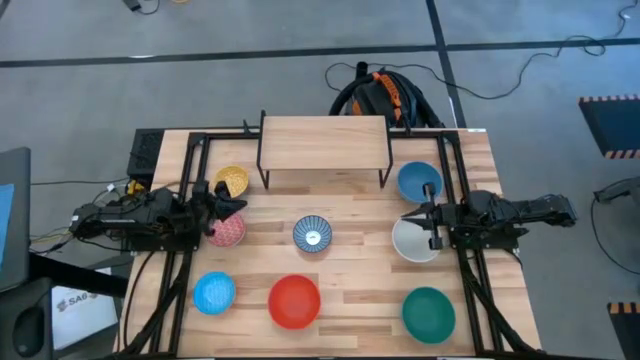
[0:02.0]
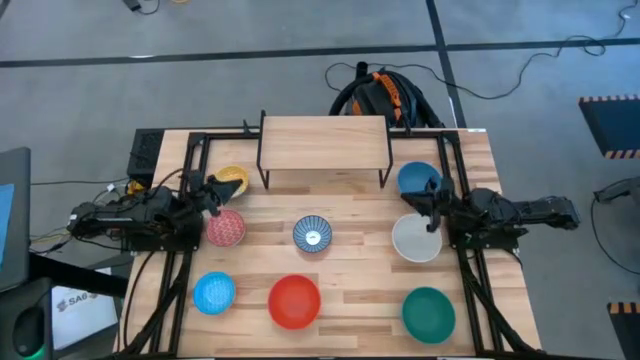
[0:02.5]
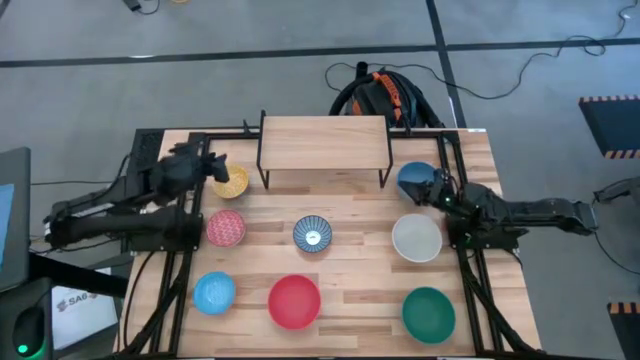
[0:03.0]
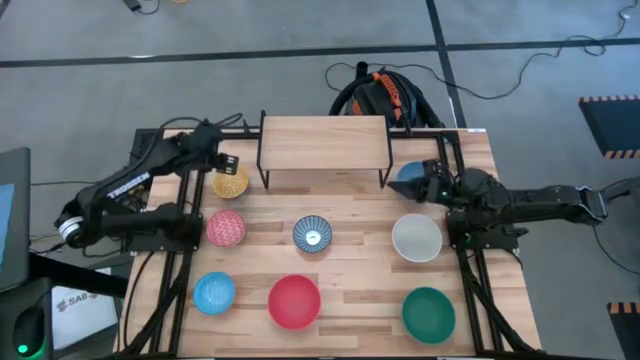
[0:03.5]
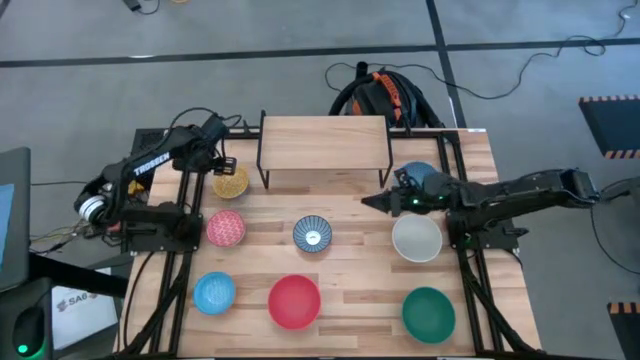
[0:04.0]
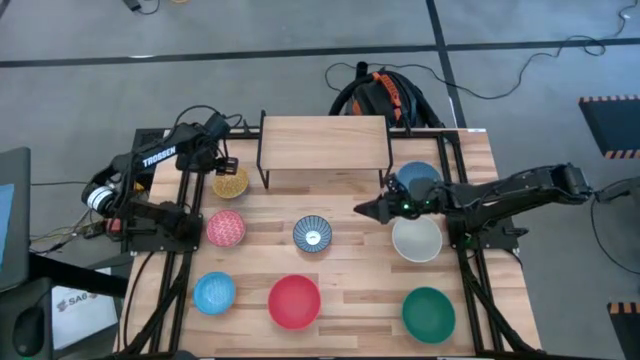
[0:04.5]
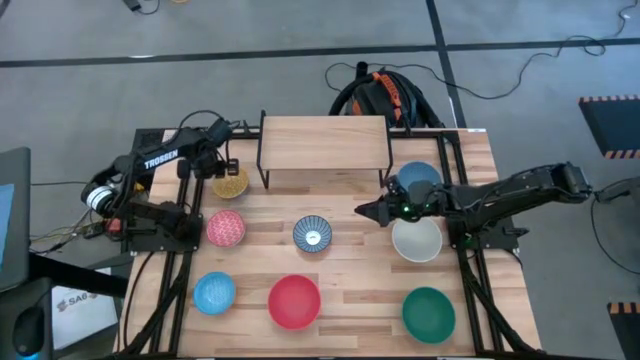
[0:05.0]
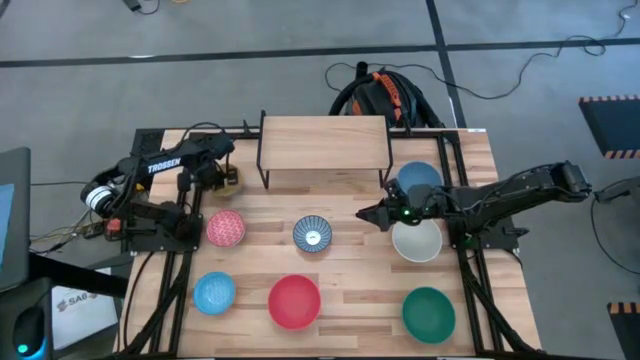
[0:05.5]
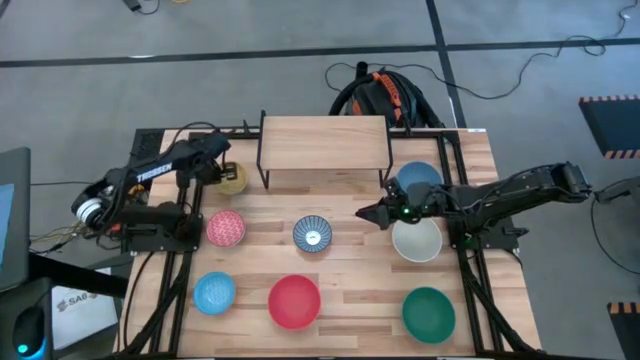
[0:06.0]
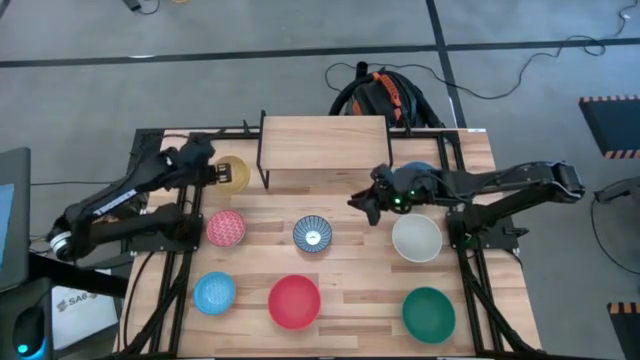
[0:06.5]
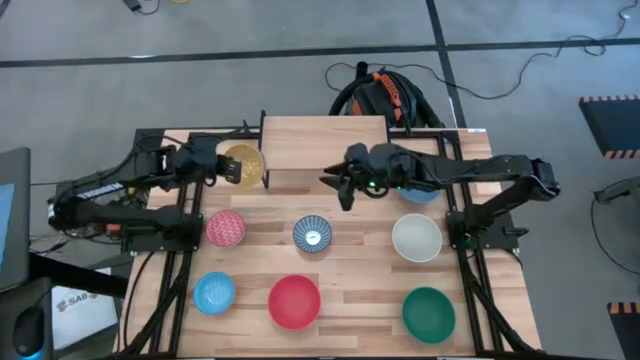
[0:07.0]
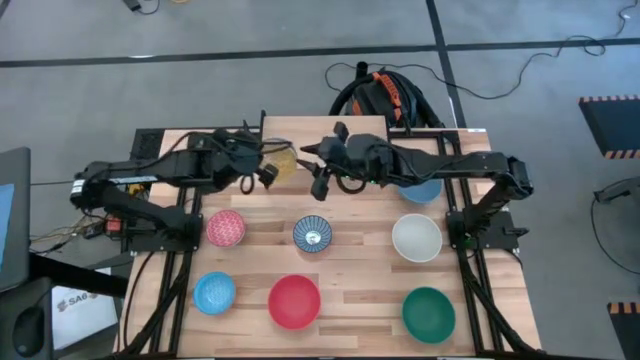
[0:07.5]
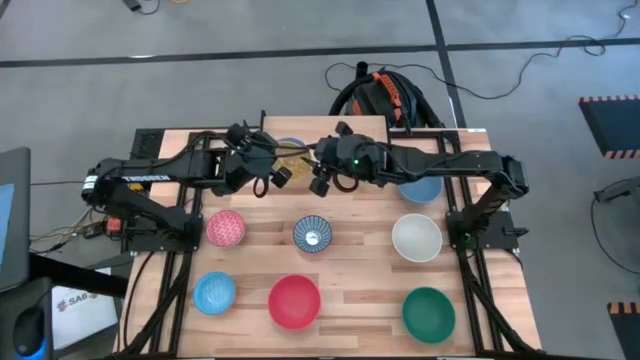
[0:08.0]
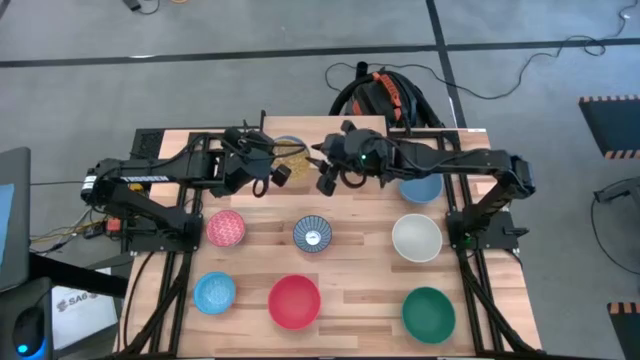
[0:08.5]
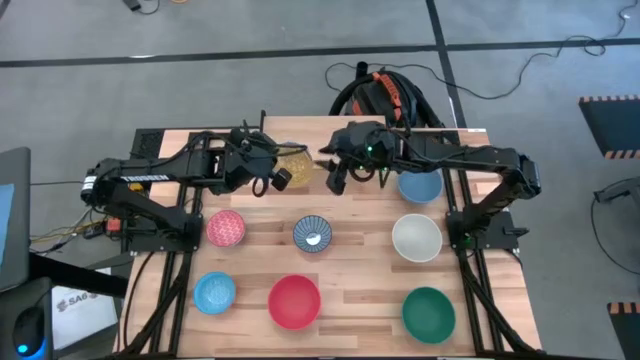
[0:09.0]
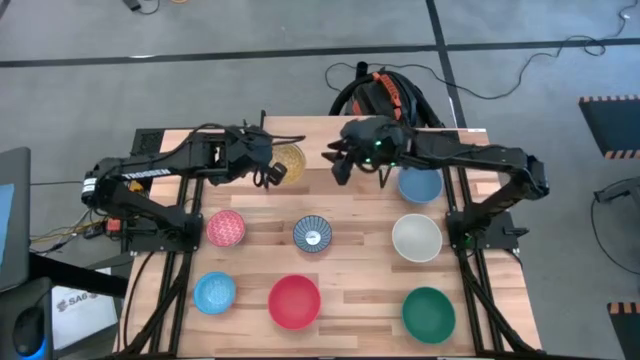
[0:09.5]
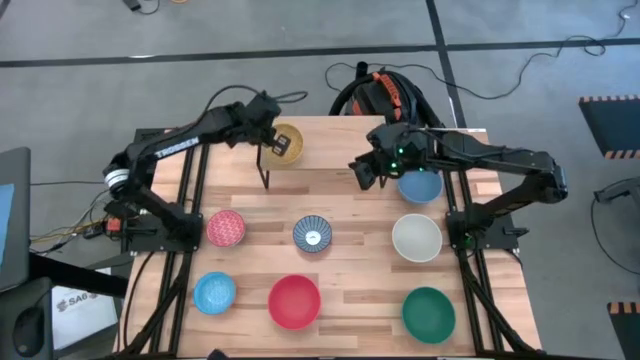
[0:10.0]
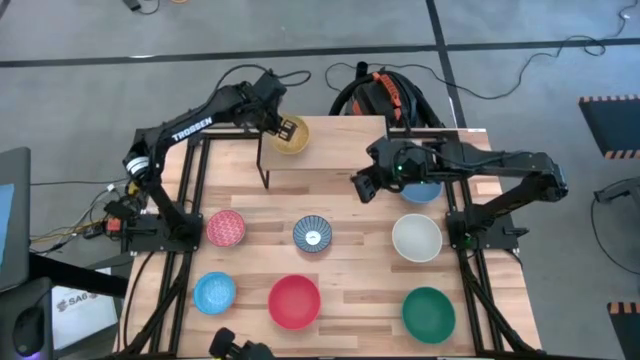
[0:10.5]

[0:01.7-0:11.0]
Task: Place and stack bowls onto a shelf
Put the yellow pattern bowl on the shelf

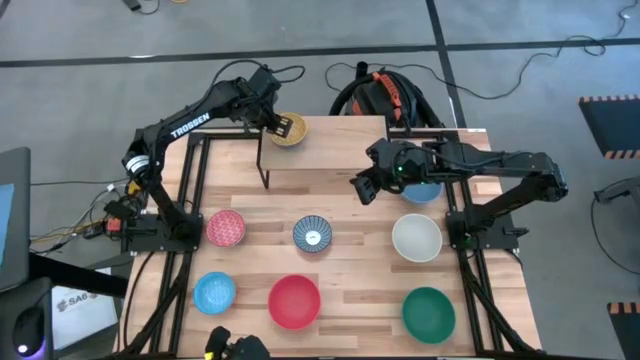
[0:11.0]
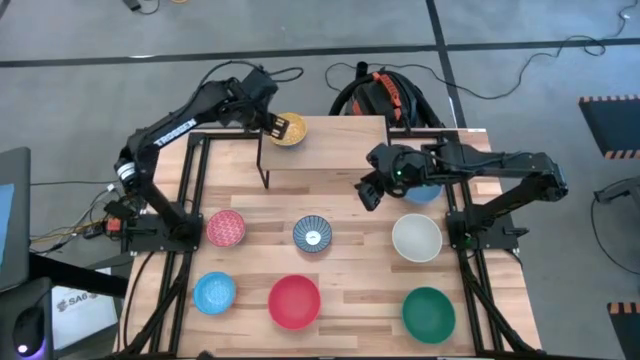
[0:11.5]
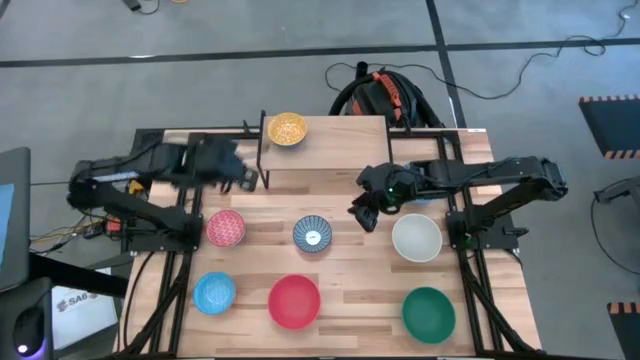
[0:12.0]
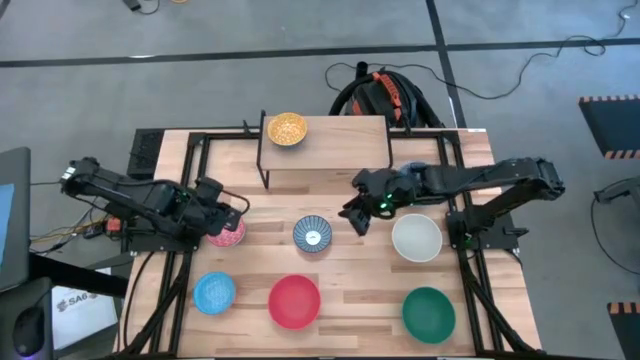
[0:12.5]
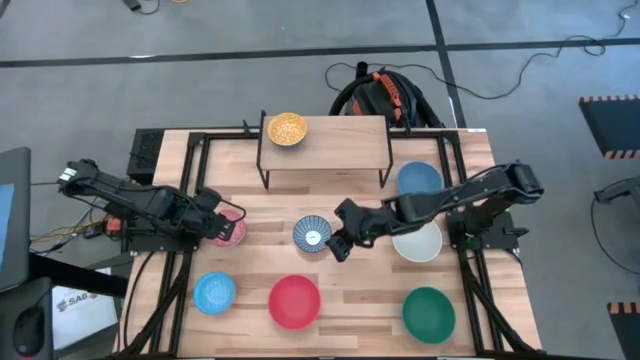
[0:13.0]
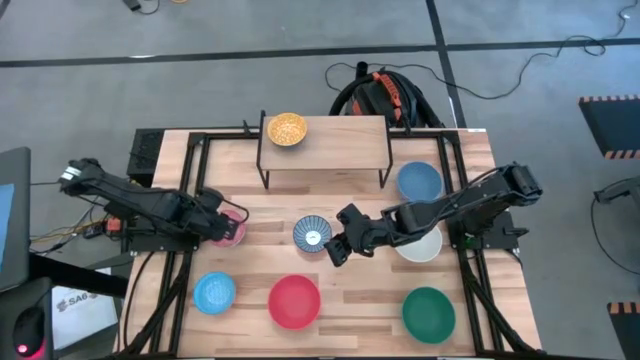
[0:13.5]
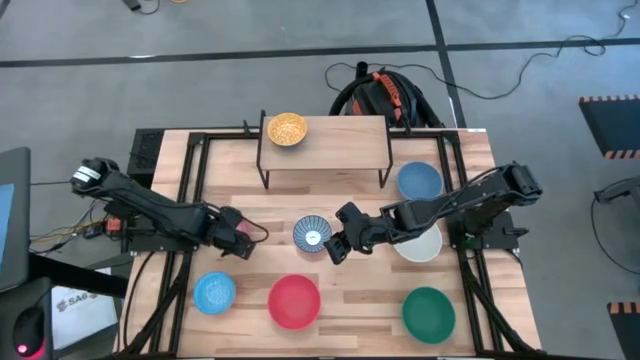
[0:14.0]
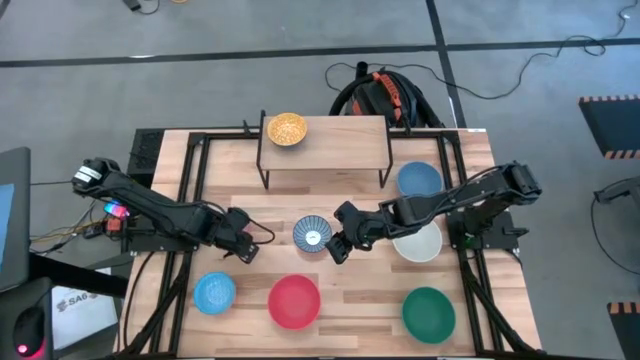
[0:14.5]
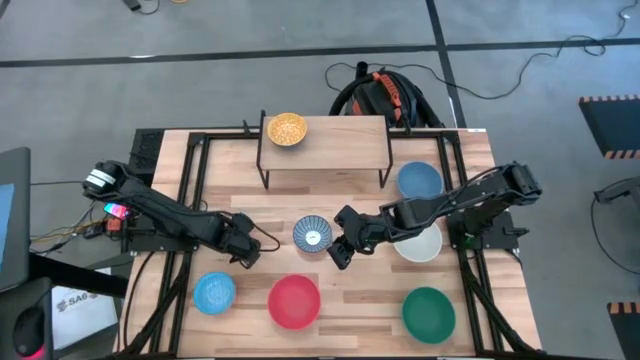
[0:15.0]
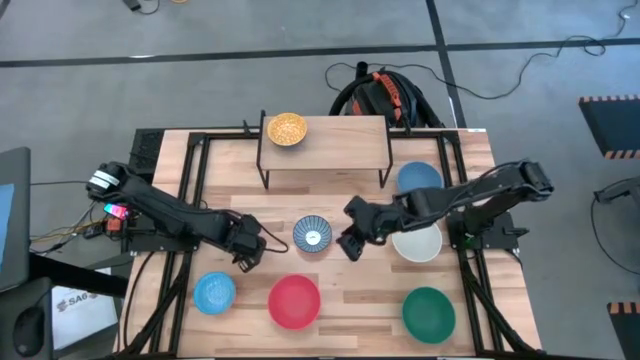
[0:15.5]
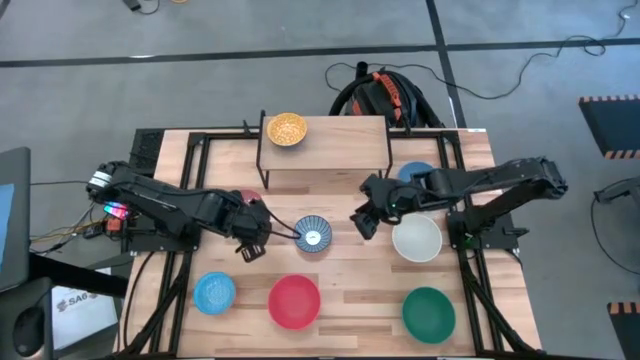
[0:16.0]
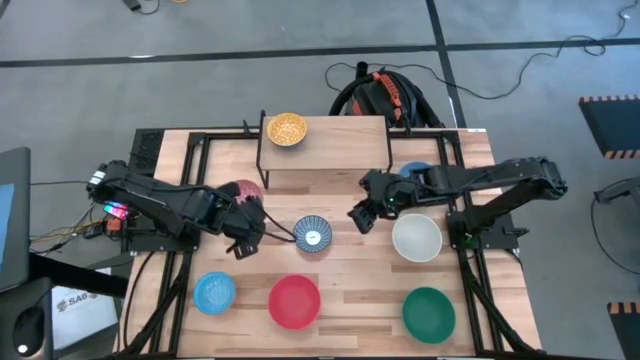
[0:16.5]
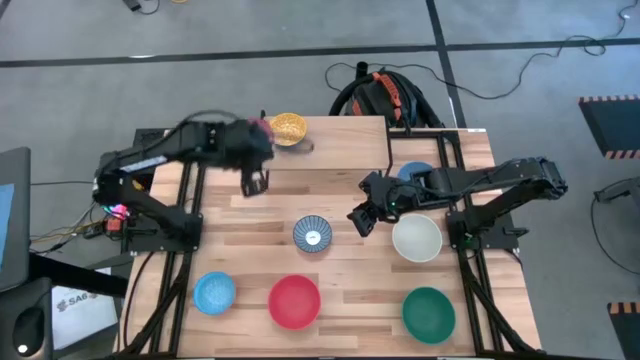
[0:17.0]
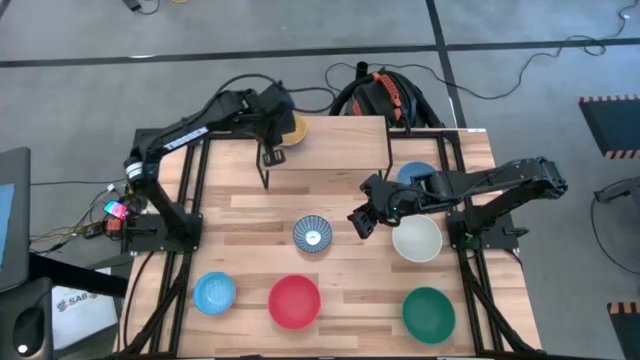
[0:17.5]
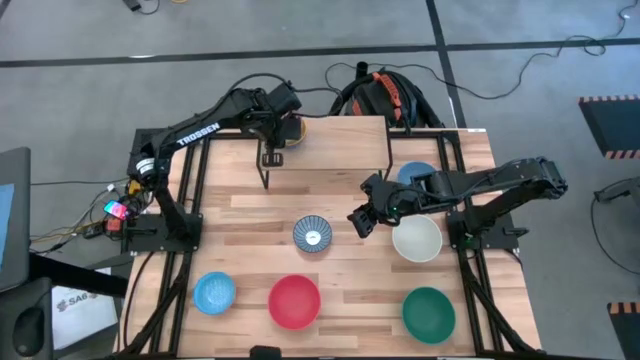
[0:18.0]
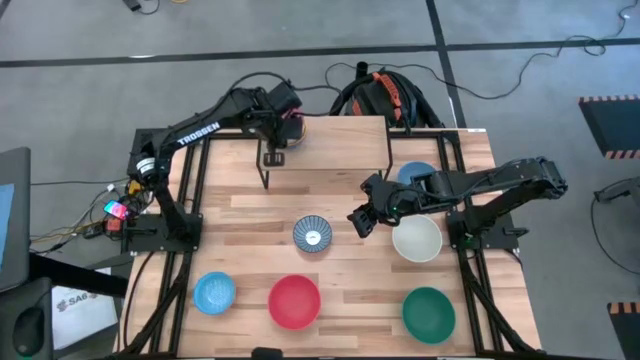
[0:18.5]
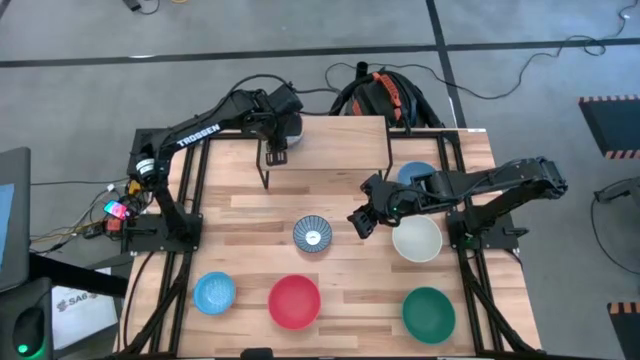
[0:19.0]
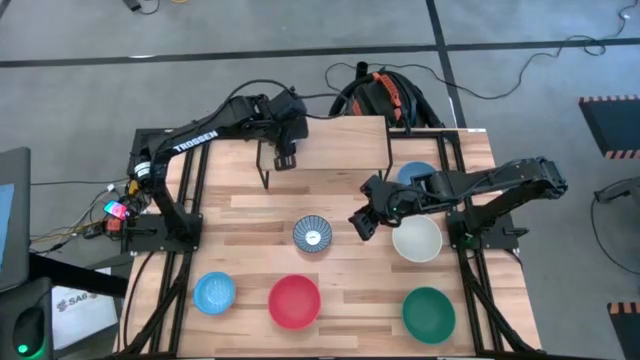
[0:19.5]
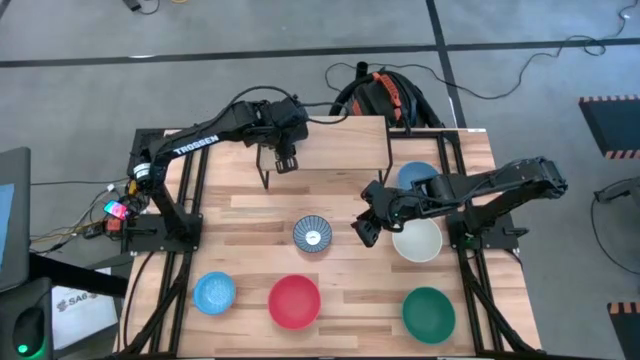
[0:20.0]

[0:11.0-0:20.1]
Stack the red pattern bowl on top of the yellow pattern bowl on the shelf

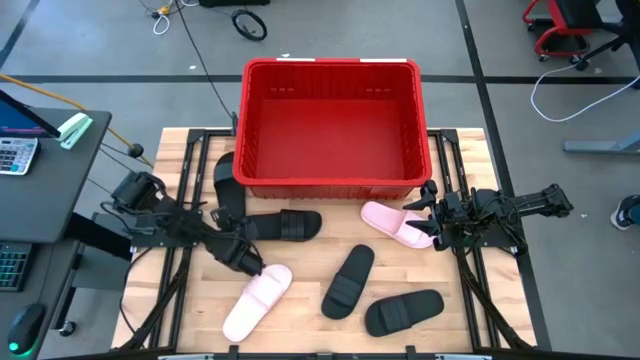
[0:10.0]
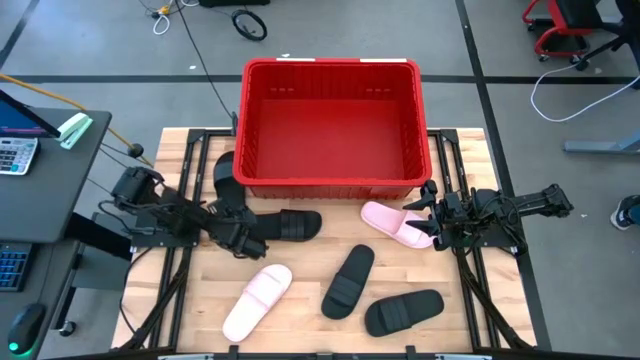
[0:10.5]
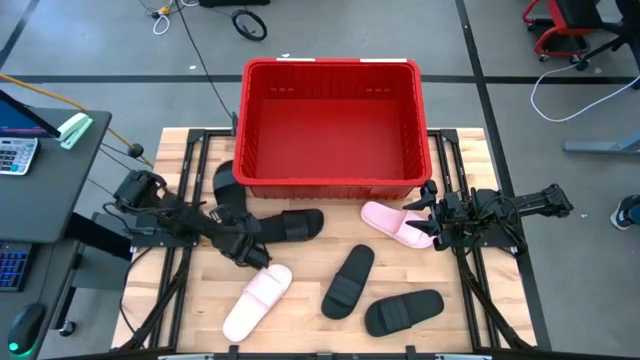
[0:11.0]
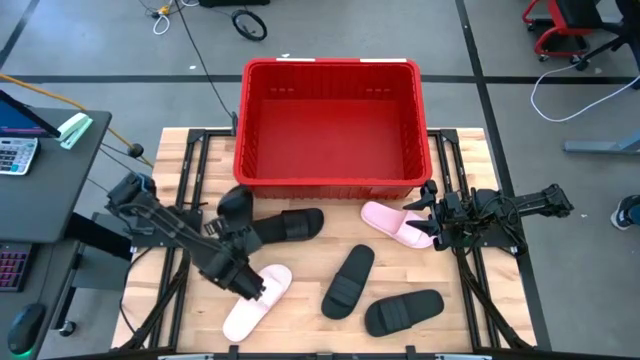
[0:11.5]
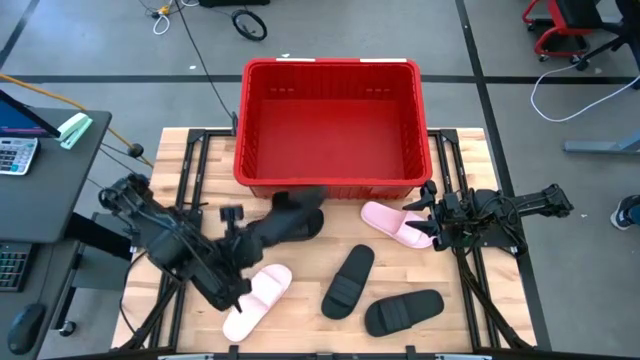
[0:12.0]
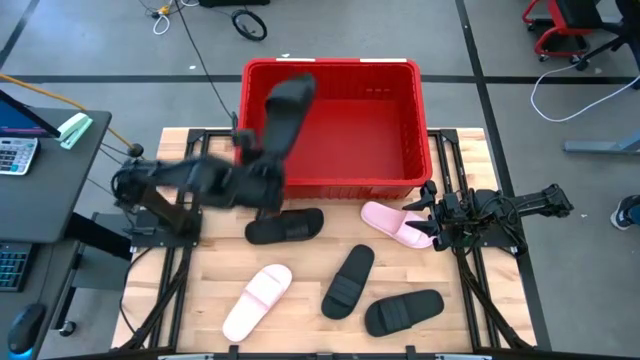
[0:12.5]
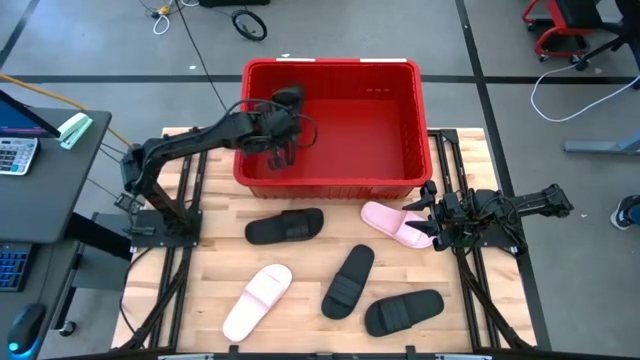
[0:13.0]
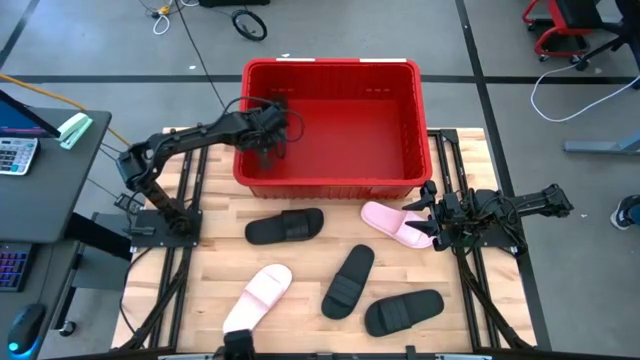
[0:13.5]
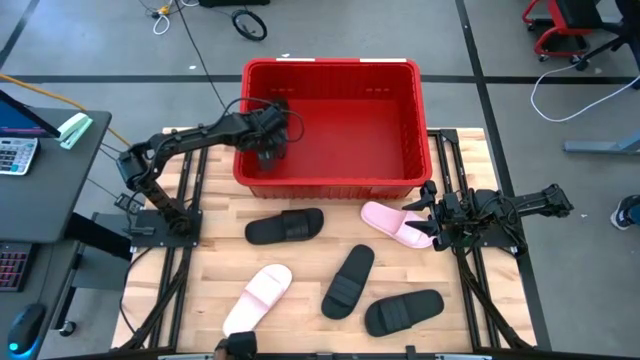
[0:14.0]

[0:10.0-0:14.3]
Task: Pick and place slides into bin
Put the black slipper into the red bin
